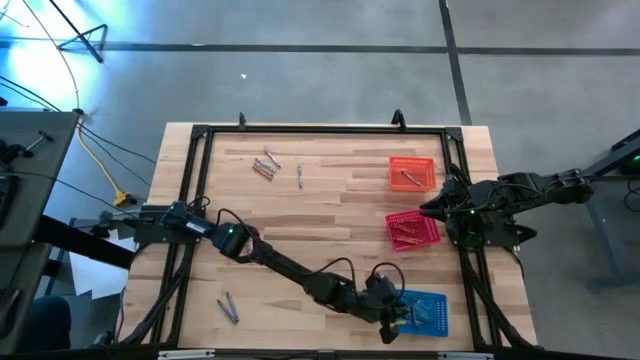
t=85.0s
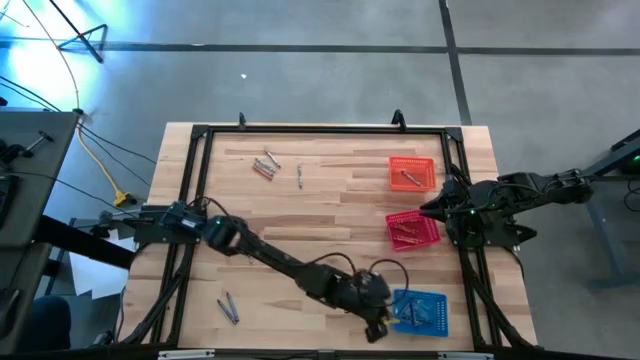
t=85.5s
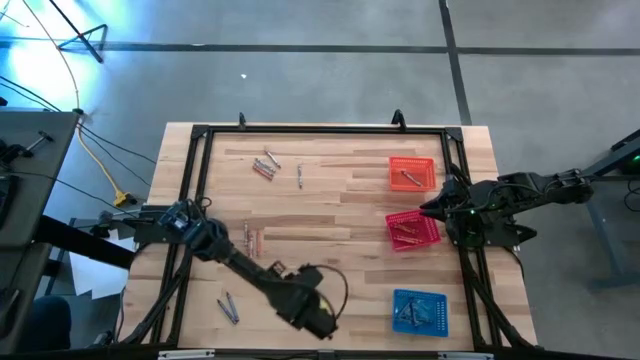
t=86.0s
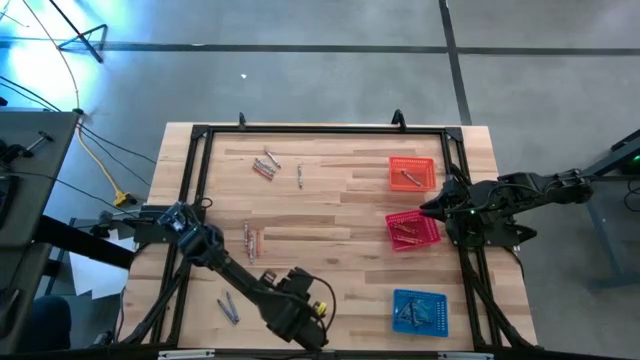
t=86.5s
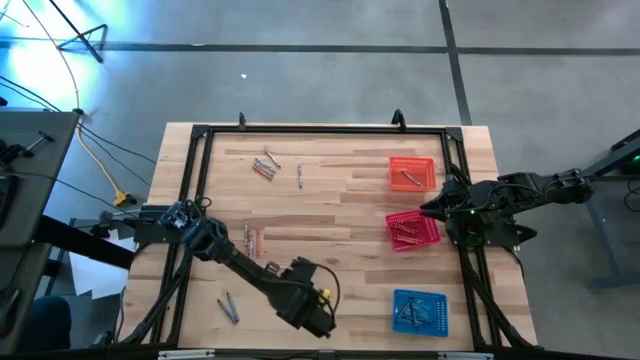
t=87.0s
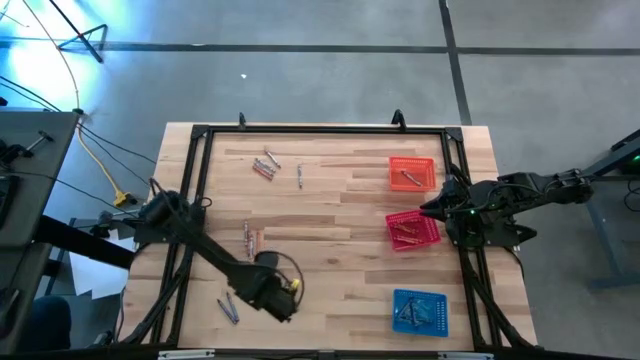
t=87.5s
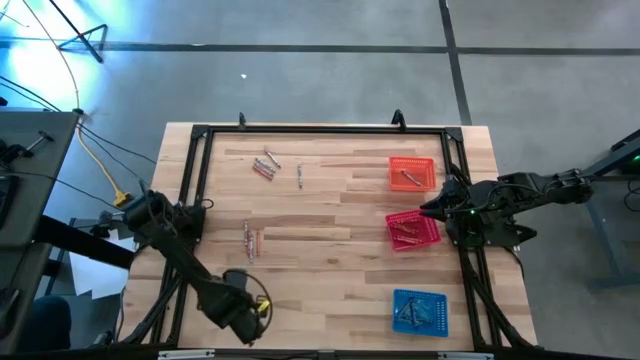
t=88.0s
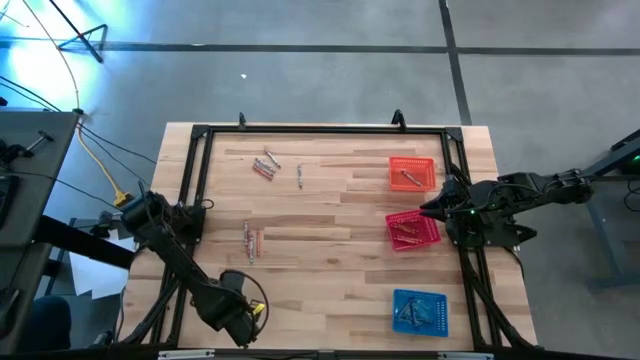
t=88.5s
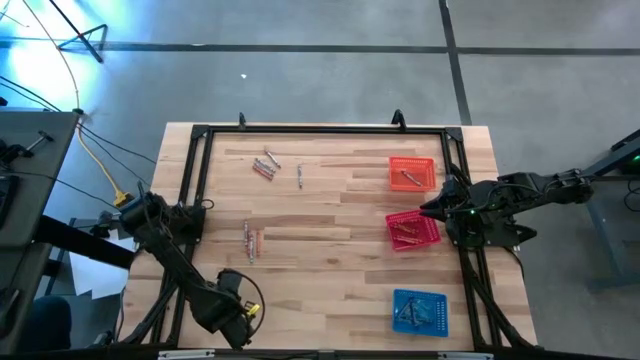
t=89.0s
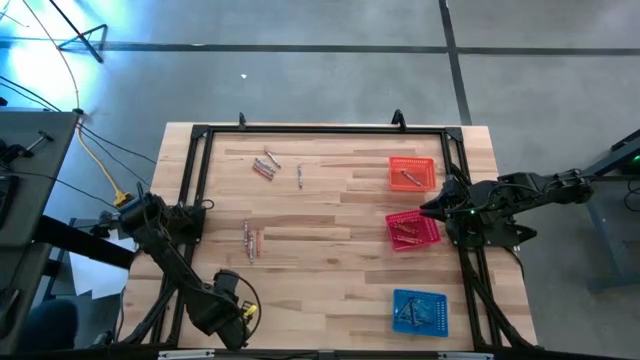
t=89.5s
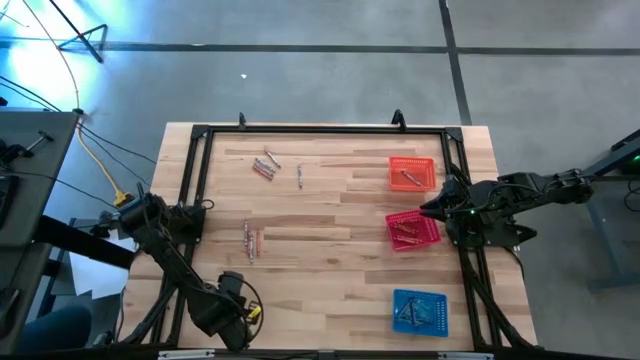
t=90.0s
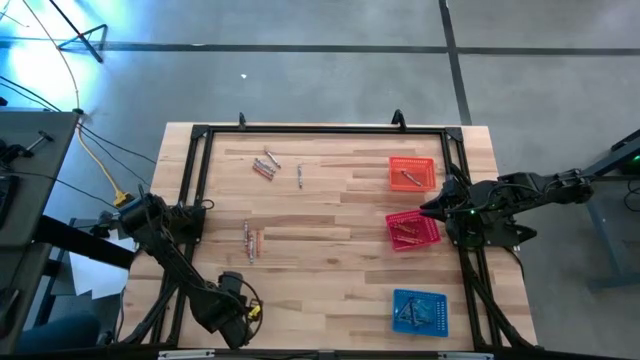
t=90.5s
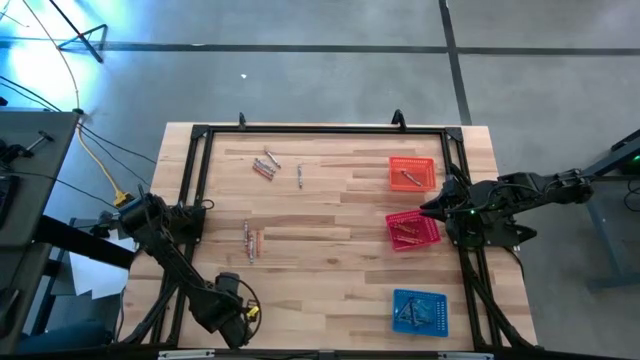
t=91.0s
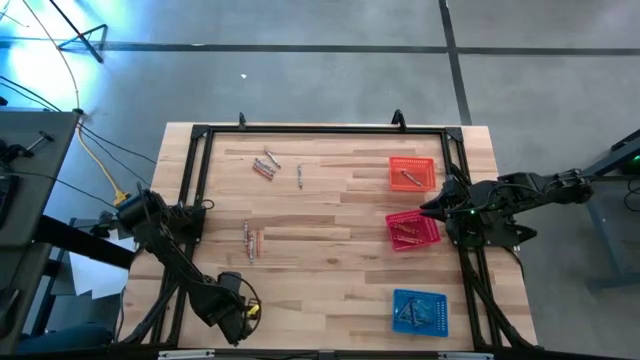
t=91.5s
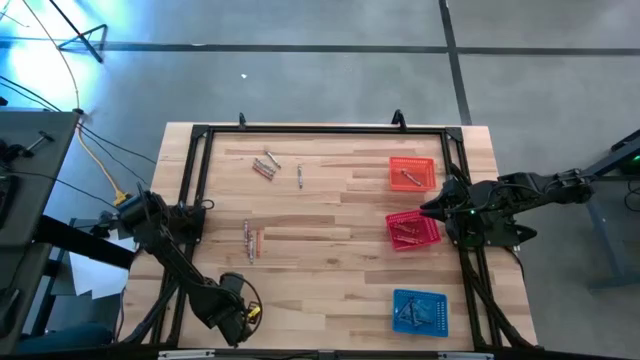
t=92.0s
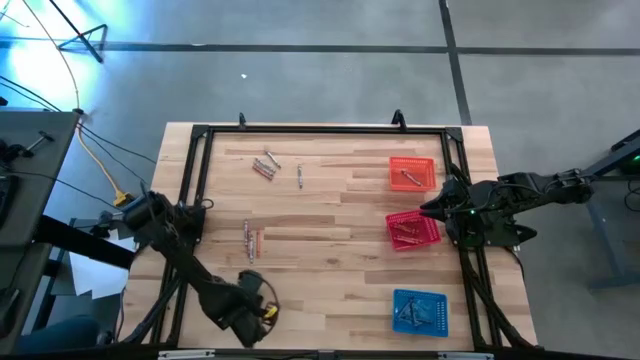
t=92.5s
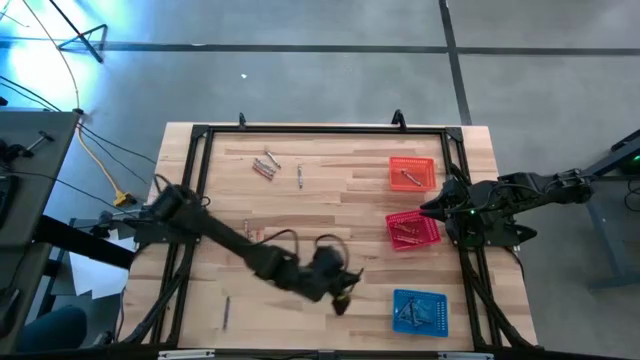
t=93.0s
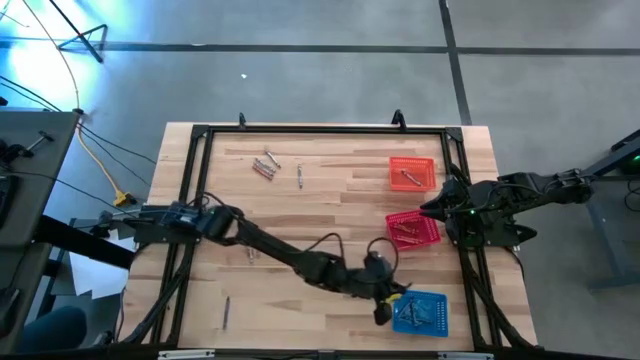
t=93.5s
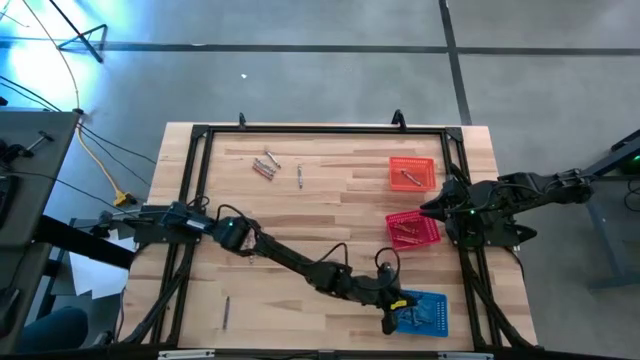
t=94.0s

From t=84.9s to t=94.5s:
Task: Sort crayons
Put the blue crayon into the blue bin

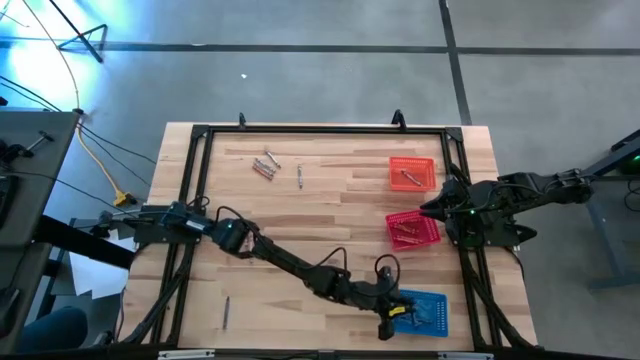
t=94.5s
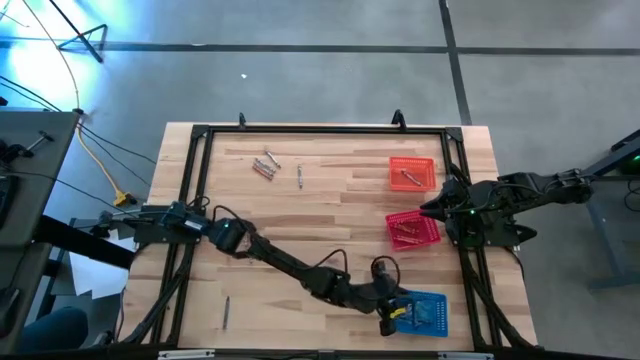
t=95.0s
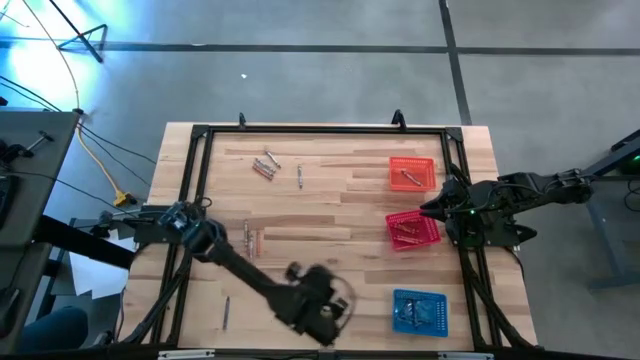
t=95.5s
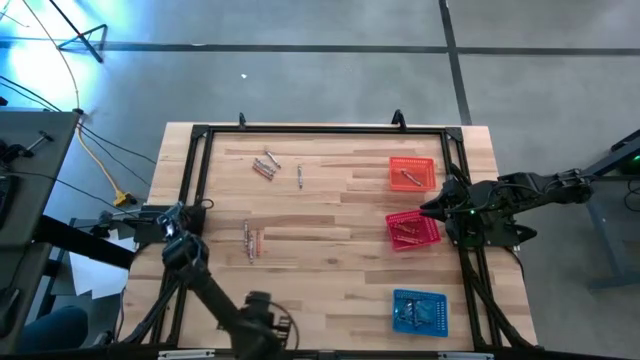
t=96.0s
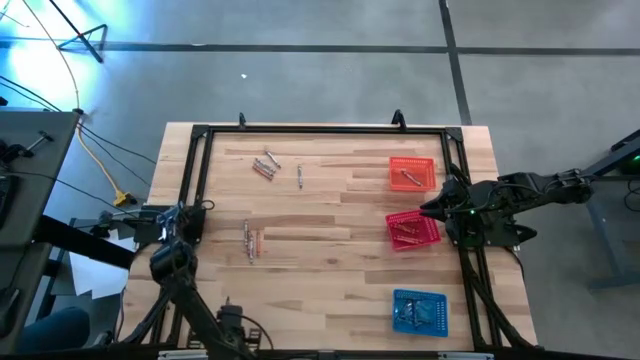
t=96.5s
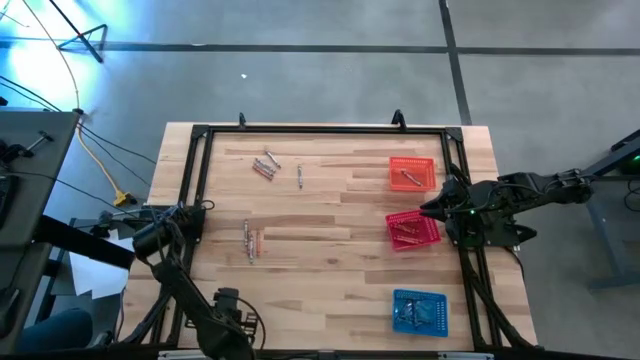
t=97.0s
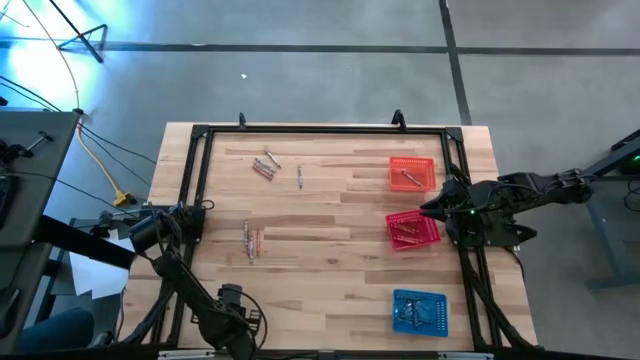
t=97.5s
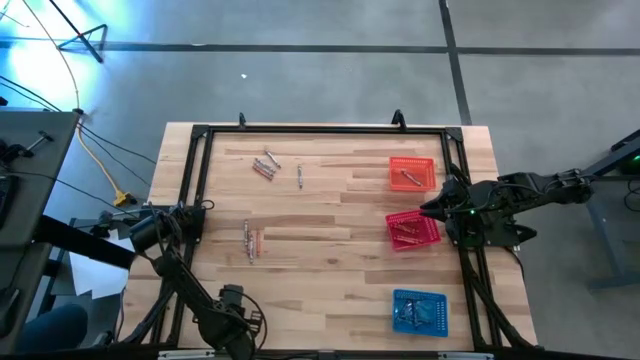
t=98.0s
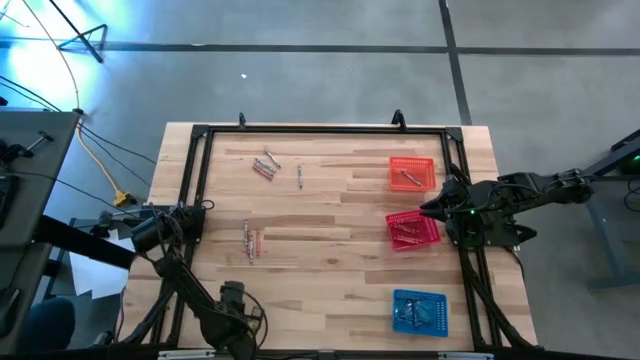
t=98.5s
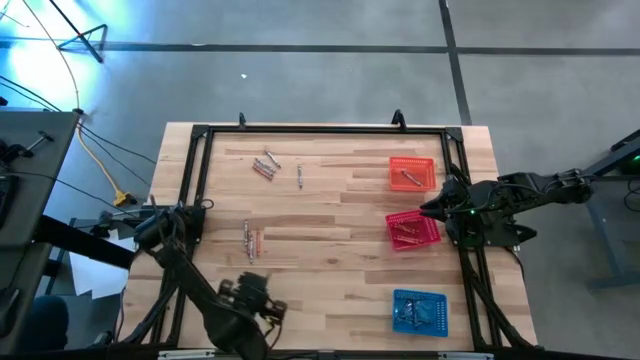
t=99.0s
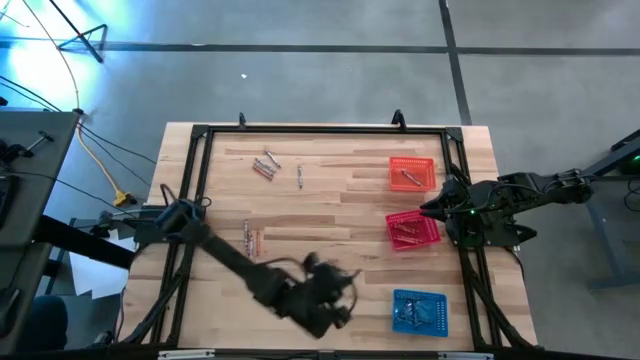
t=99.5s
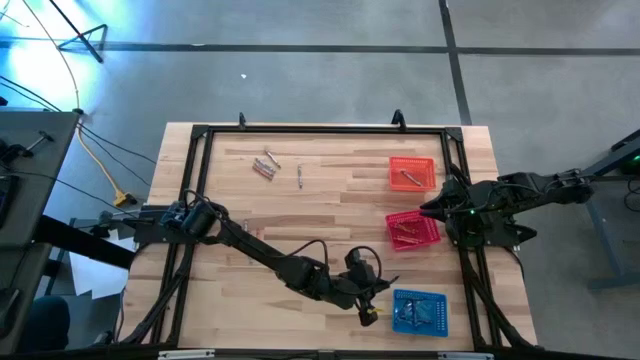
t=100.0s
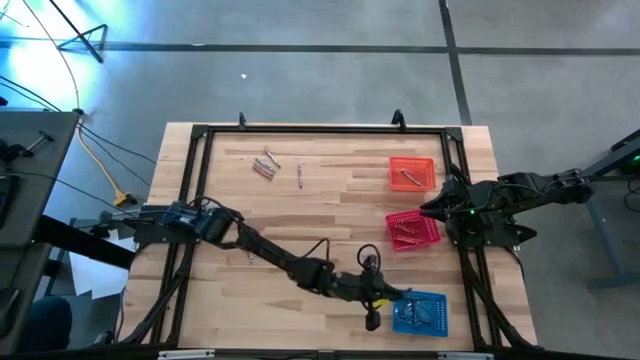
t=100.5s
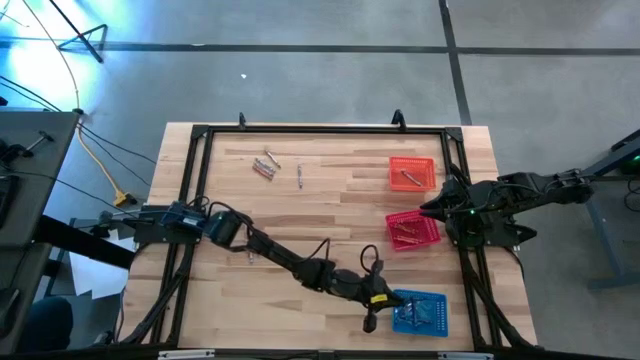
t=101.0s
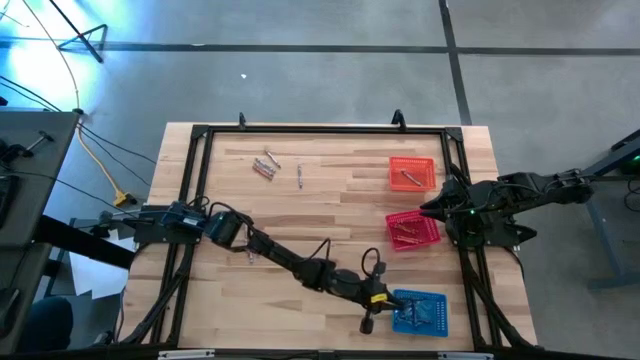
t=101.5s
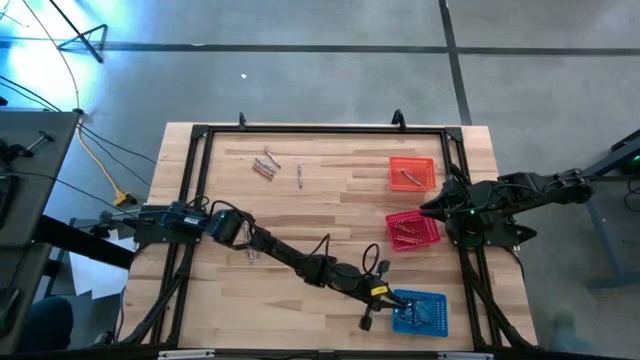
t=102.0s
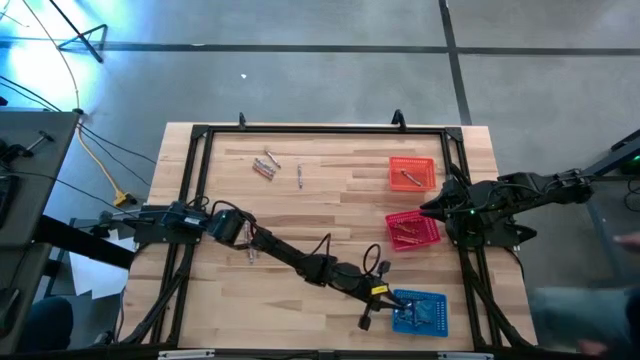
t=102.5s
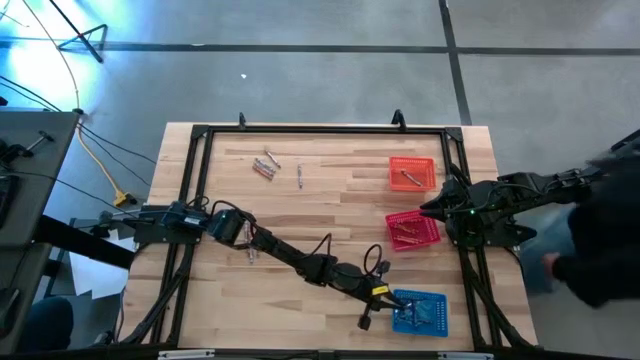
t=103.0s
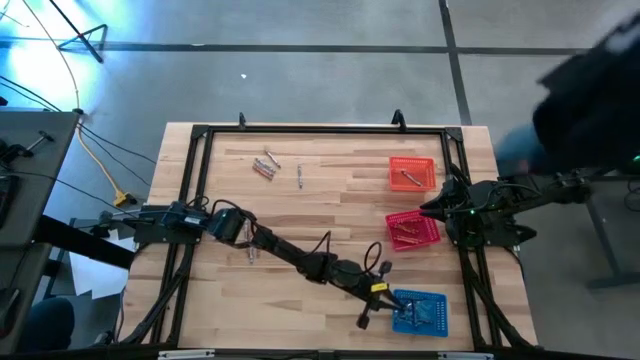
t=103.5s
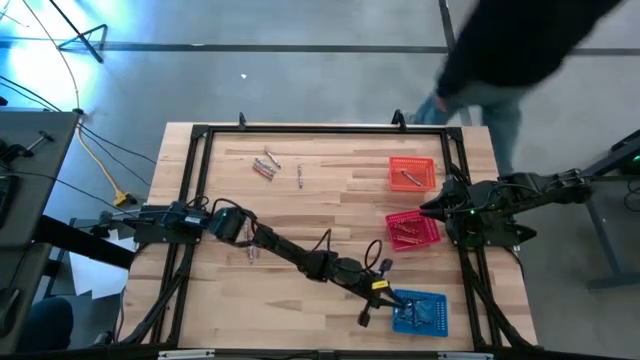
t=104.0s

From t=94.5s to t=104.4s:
Put the blue crayon into the blue bin

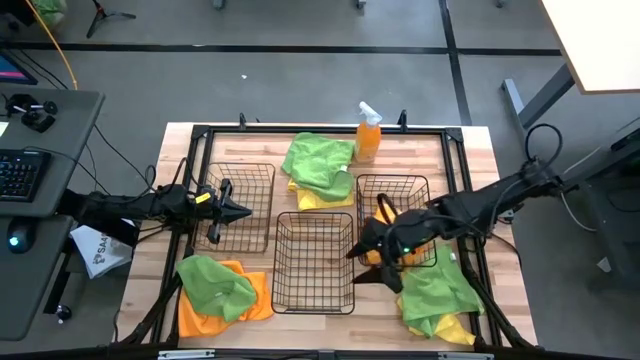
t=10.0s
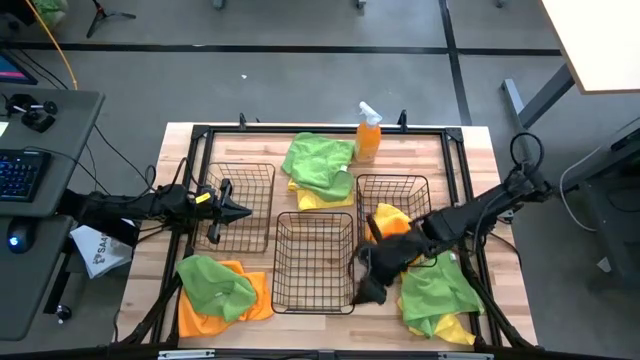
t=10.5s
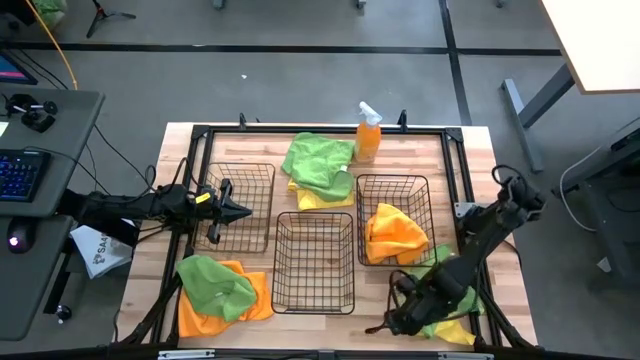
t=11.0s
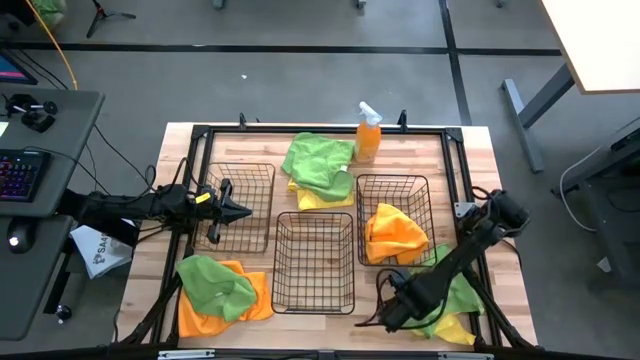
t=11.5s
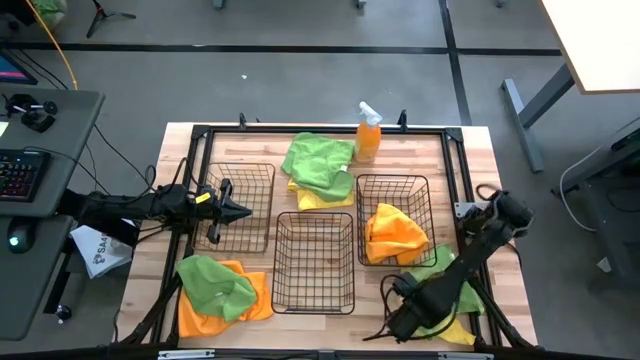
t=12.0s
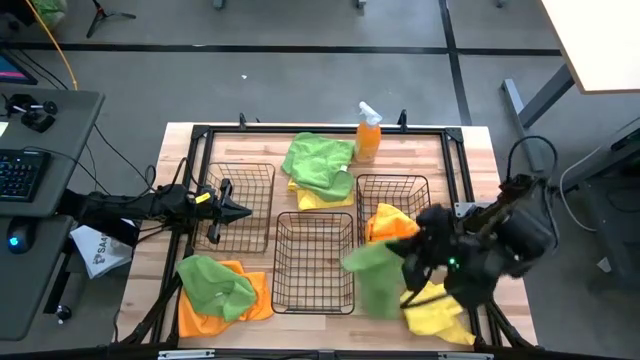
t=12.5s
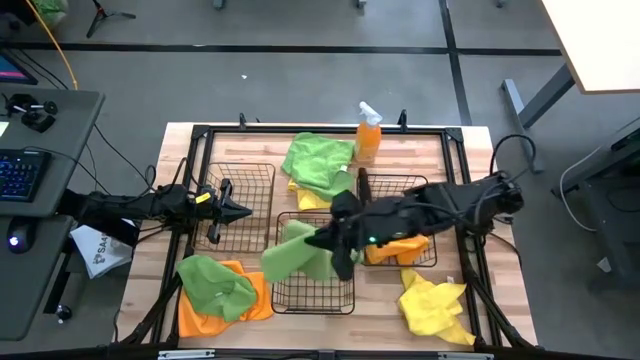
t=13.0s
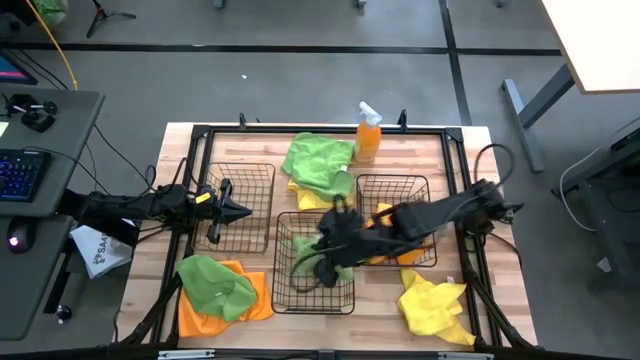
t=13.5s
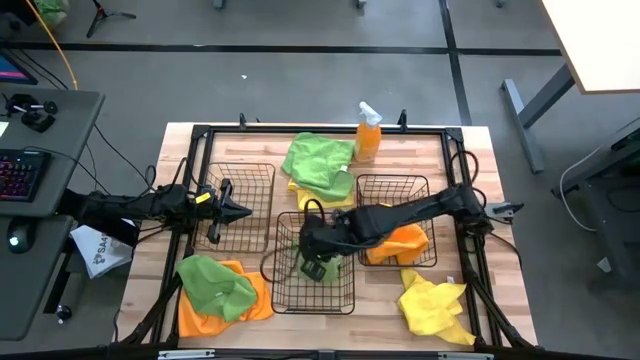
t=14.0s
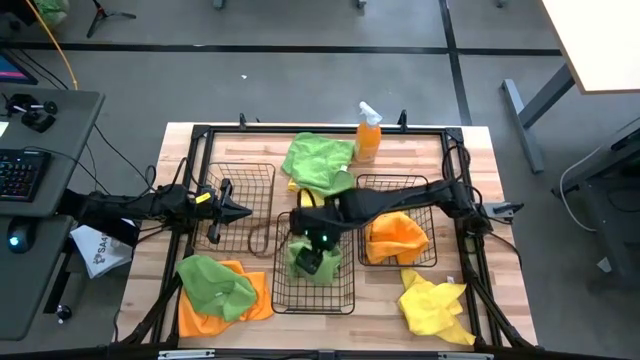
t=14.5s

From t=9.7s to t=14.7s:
Task: Sort microfiber towel by color & place in baskets
Put the bottom right green towel into the middle wire basket
